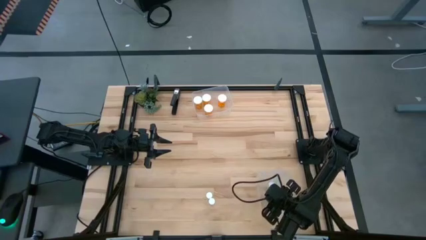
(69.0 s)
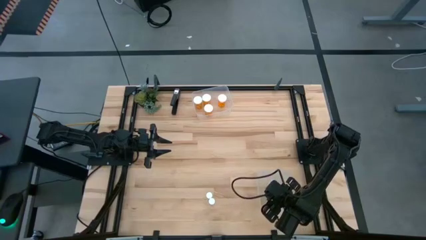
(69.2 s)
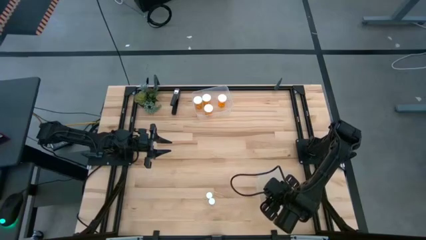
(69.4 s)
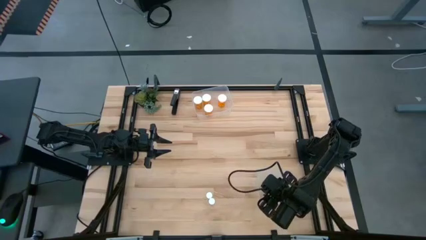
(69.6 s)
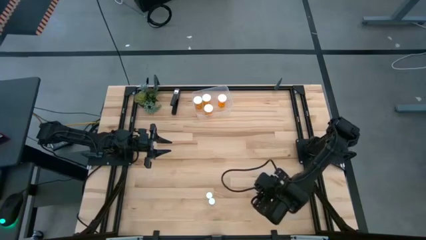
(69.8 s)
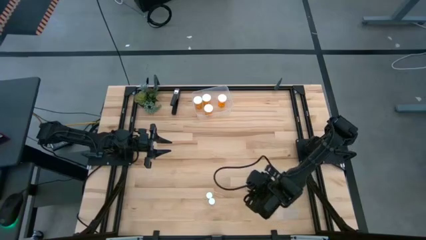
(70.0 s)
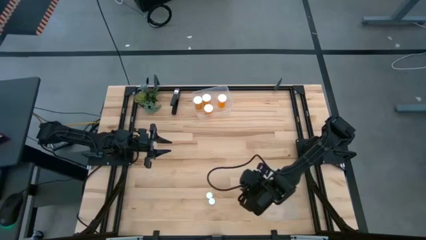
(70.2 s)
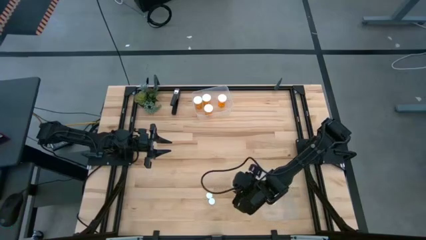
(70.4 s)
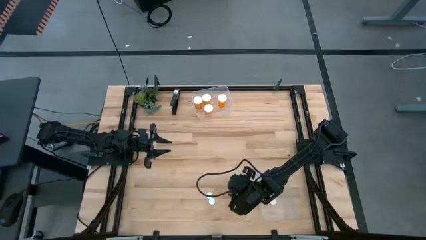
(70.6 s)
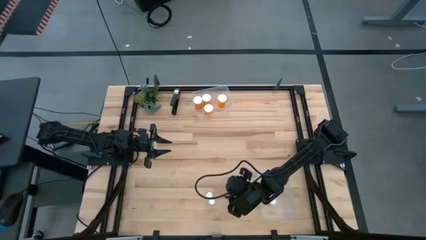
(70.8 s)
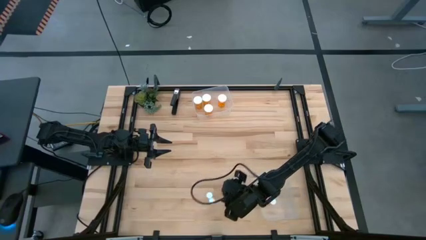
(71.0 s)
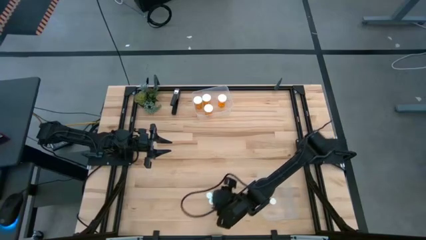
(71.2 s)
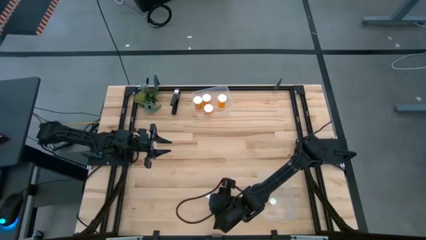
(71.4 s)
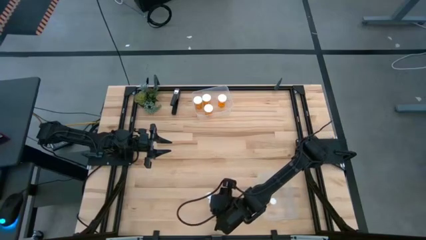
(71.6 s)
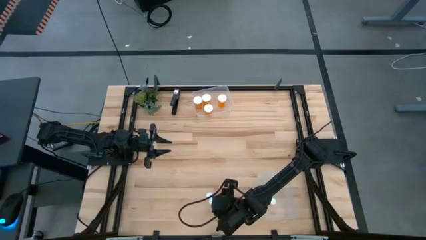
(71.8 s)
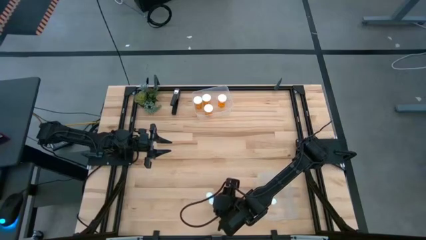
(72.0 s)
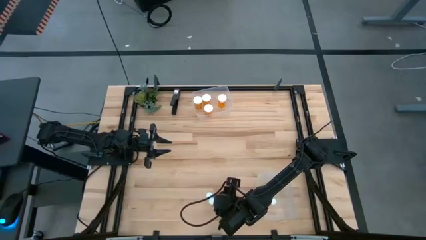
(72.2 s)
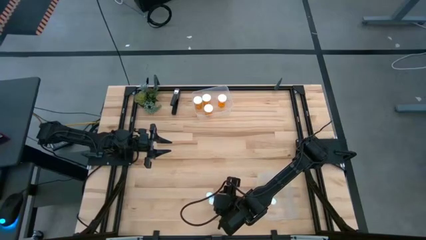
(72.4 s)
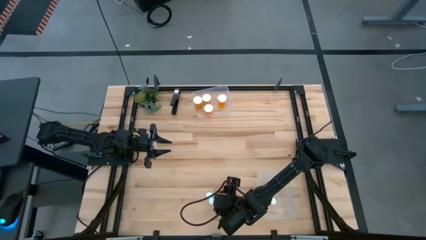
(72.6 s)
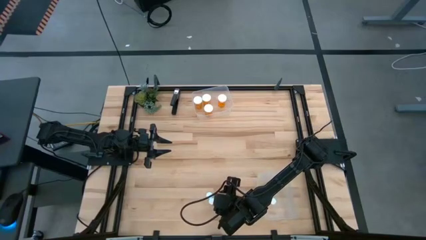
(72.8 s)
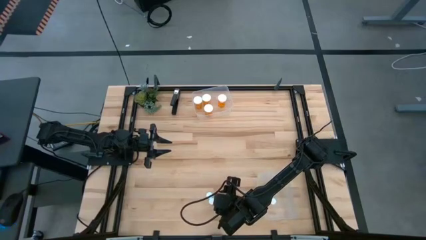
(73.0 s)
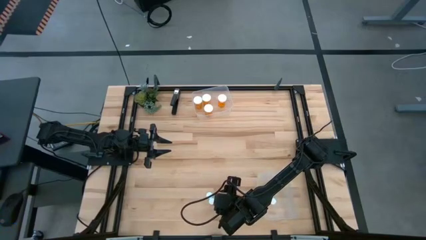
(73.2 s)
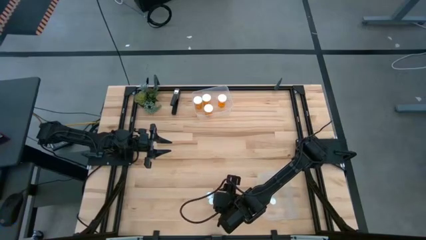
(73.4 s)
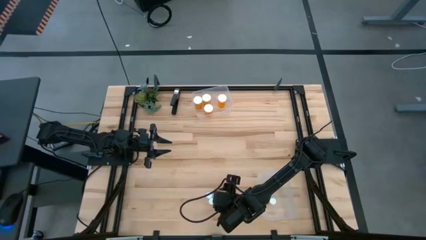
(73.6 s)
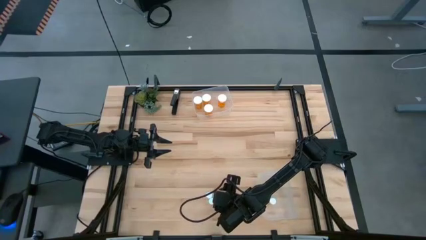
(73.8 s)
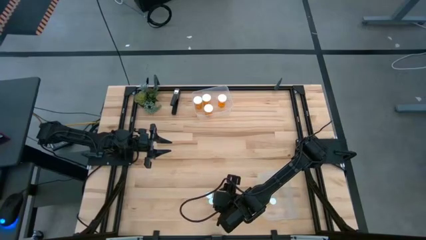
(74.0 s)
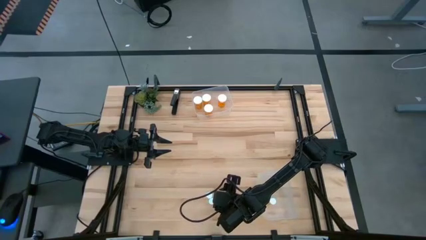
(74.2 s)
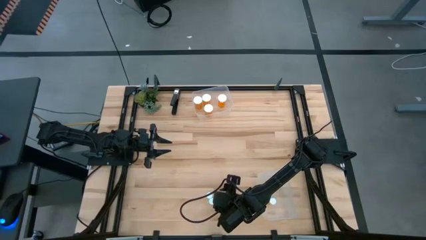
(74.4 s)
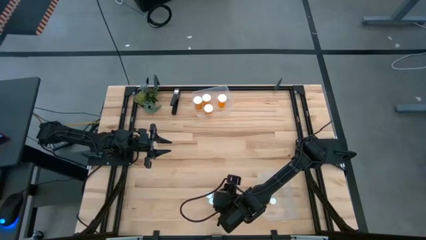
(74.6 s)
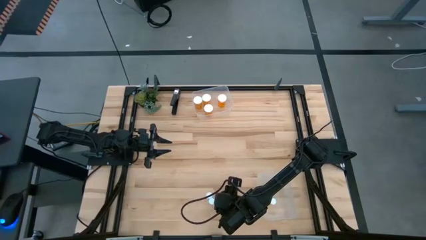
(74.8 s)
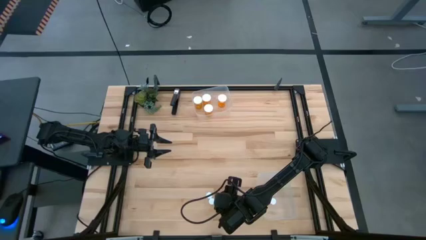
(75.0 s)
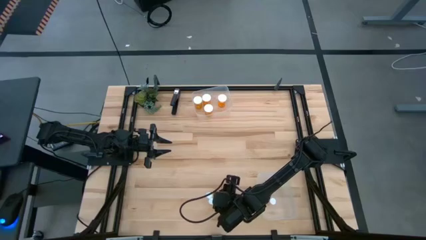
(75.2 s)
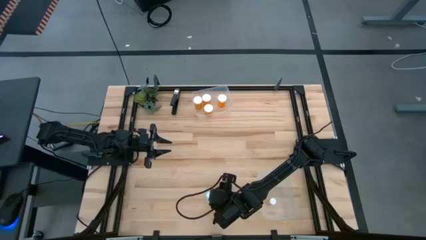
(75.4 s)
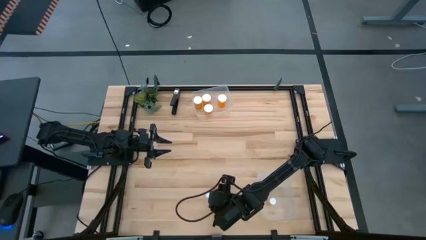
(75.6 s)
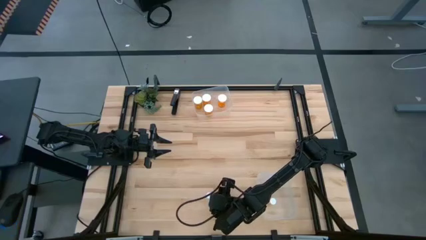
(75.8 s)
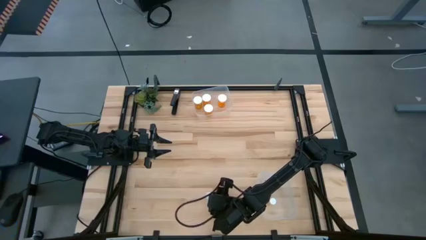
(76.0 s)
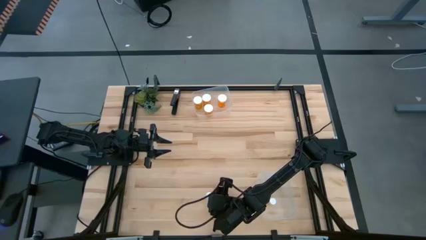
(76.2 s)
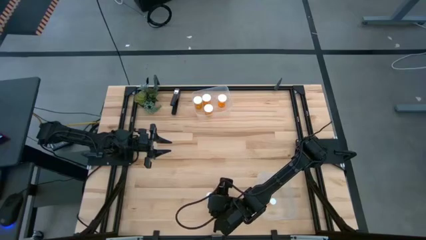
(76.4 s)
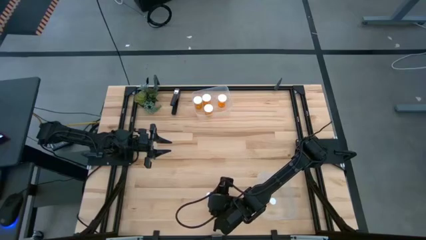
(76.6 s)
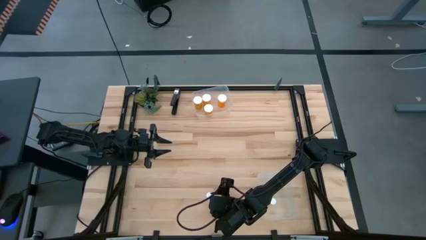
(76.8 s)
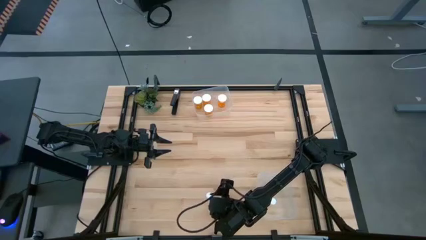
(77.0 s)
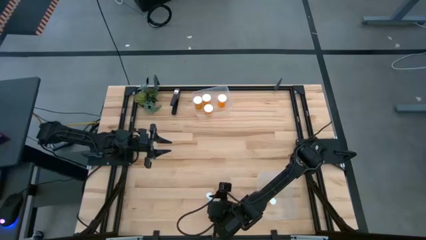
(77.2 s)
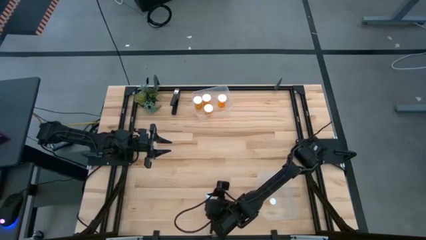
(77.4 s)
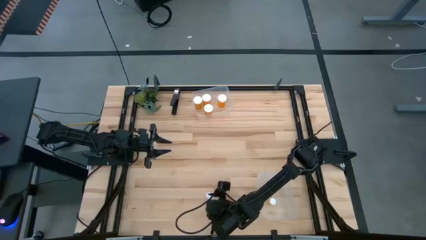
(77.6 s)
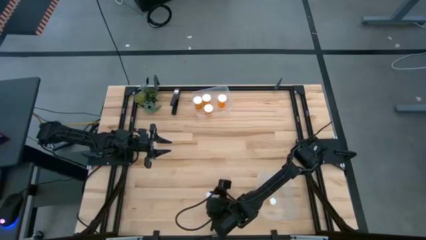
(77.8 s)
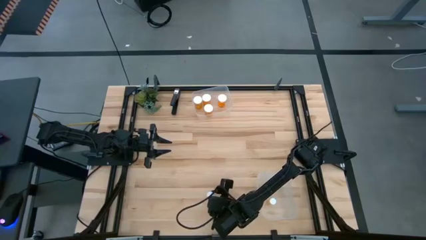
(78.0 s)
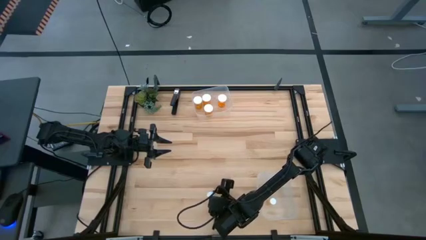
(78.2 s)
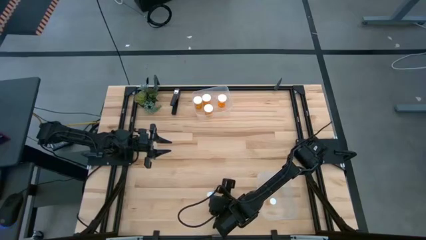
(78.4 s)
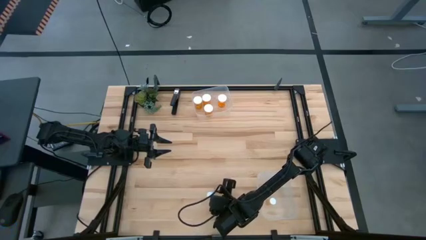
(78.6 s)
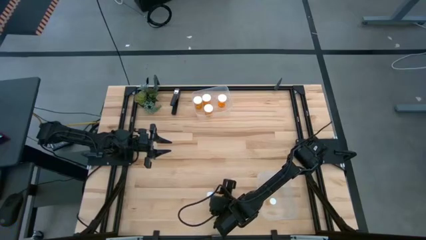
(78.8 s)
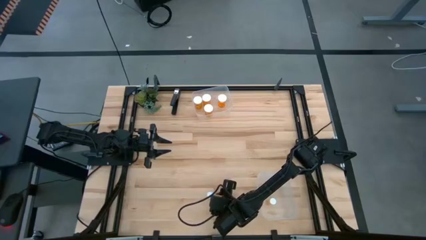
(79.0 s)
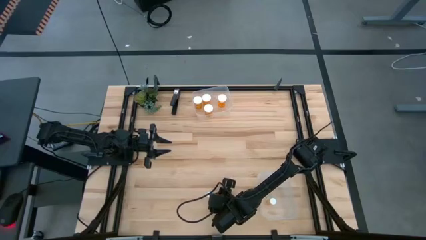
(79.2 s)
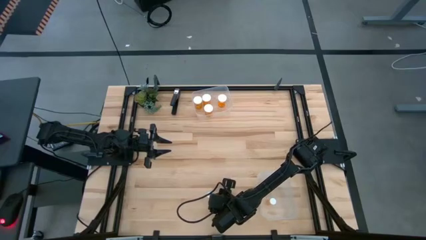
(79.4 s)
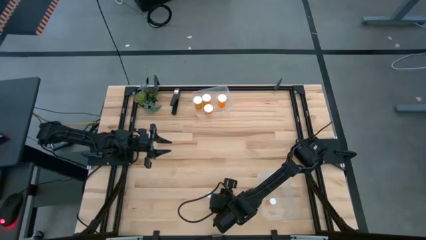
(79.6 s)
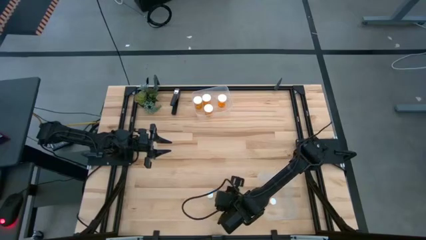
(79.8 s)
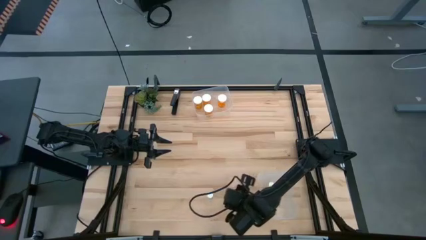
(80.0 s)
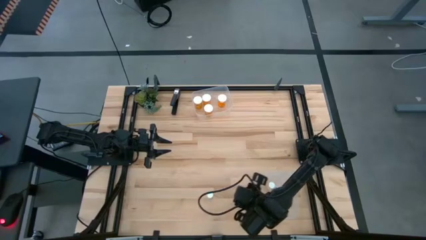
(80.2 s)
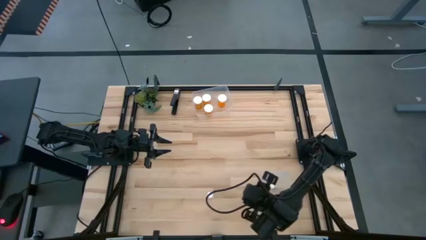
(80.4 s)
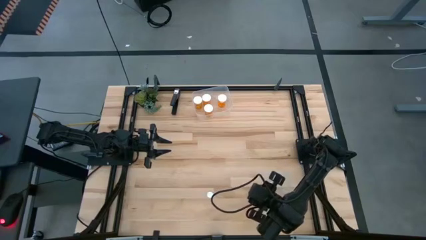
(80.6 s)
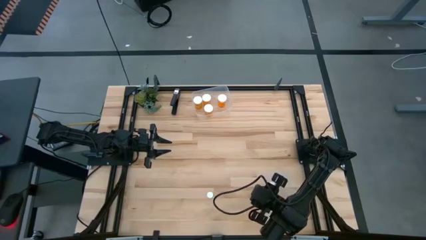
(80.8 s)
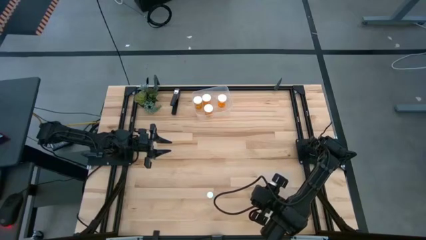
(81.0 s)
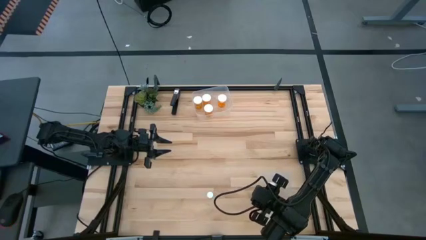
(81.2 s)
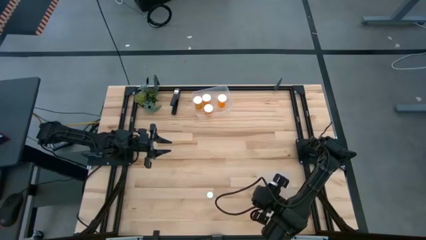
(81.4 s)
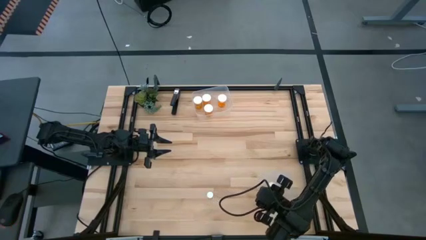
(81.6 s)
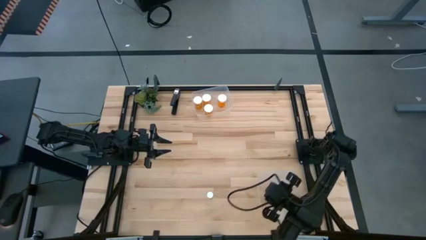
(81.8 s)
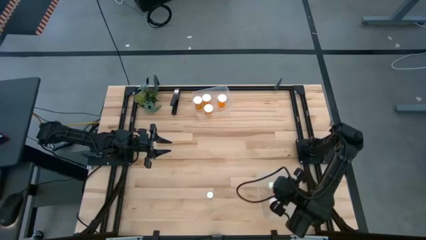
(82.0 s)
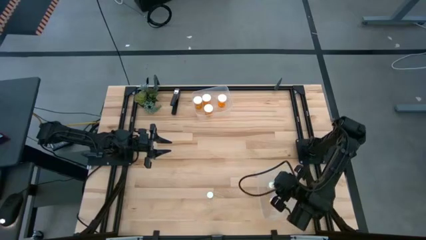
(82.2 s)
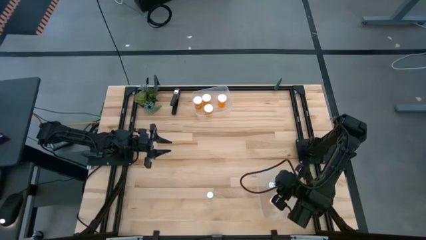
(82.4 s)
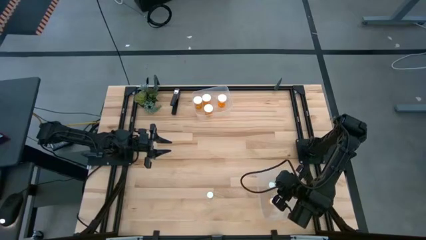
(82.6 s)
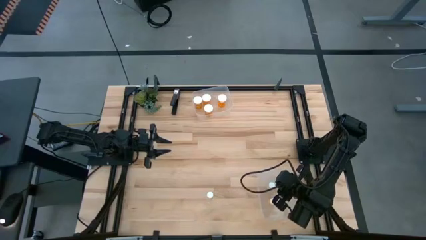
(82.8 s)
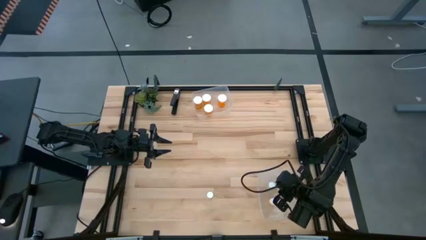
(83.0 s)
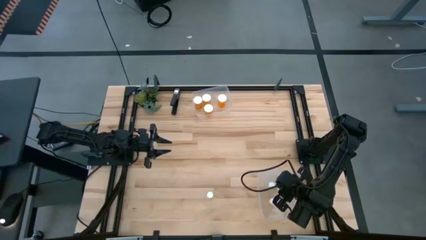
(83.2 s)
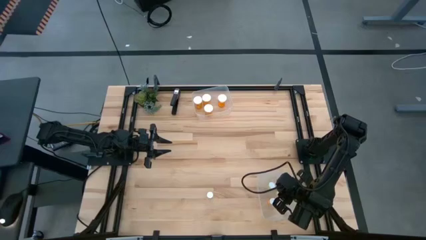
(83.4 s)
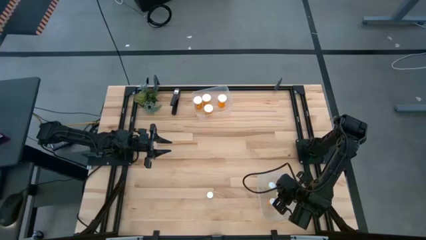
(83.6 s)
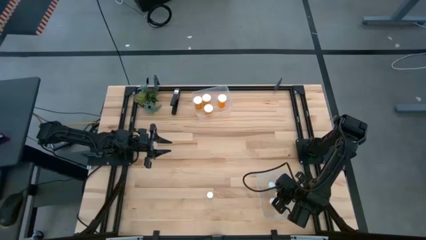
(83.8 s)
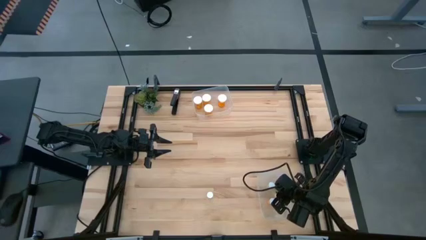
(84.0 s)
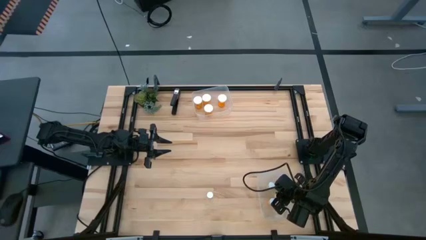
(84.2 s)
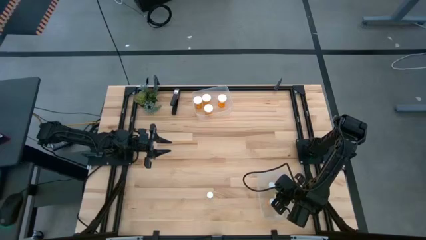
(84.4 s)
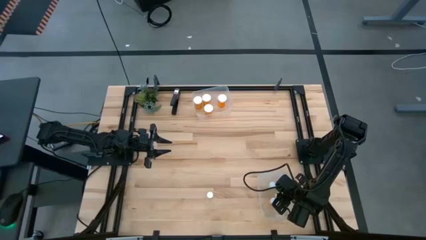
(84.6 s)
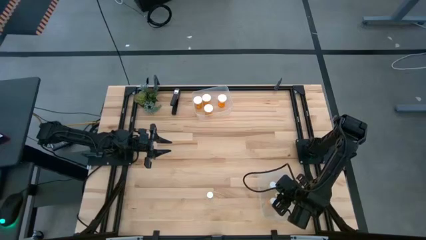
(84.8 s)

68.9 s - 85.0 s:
Task: Pick and place medicine bottles into bin by pill shape (circle, oval)
Put the small transparent pill bottle into the bottom transparent bin
